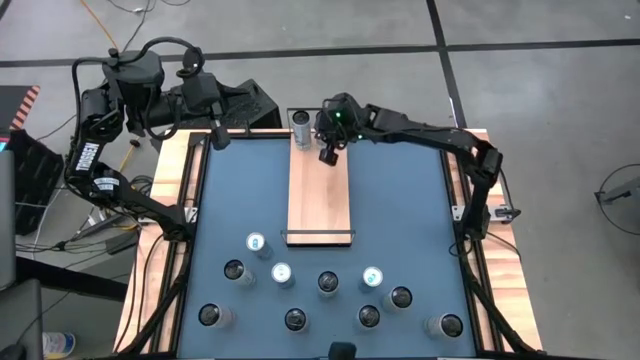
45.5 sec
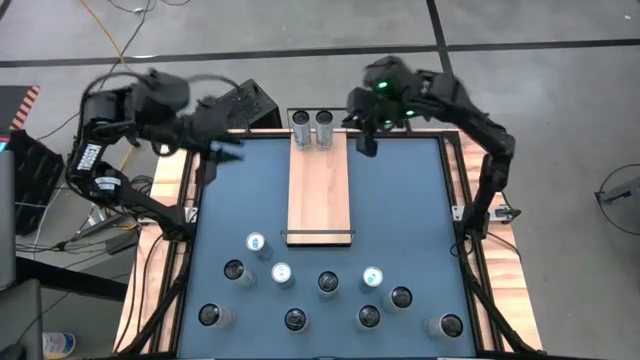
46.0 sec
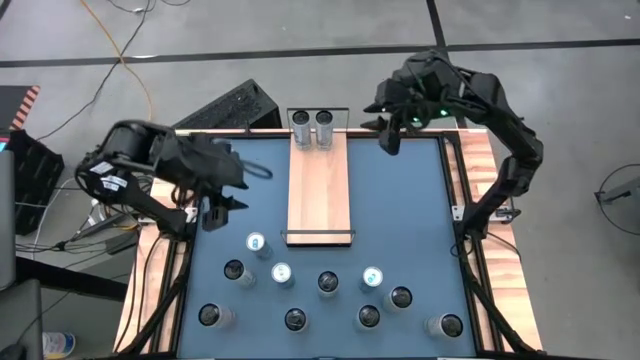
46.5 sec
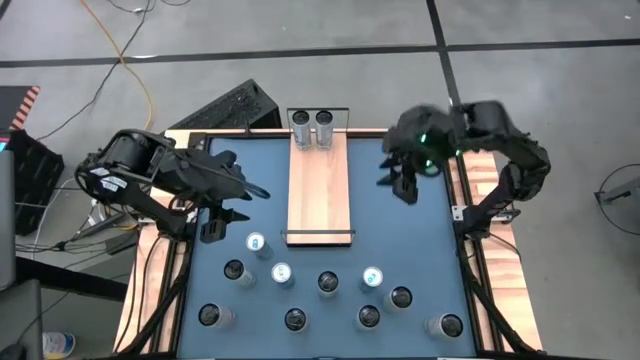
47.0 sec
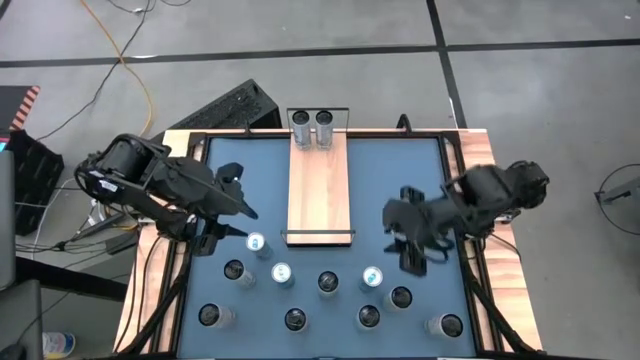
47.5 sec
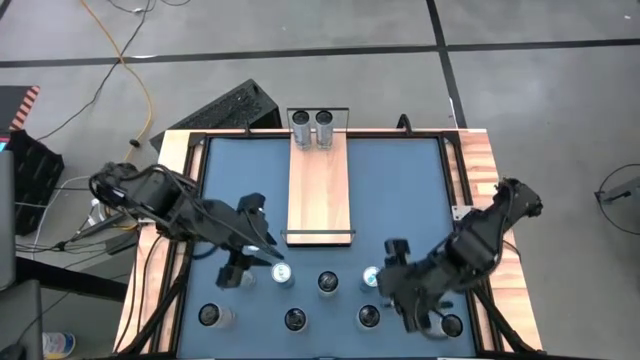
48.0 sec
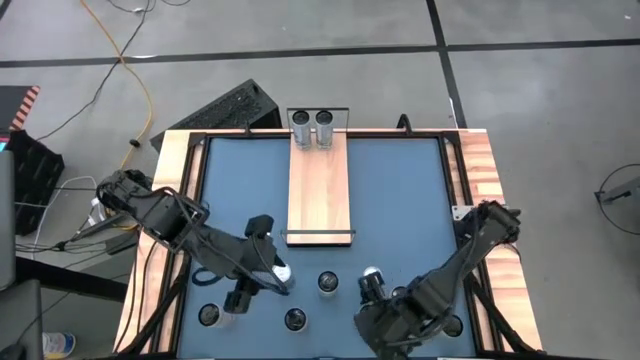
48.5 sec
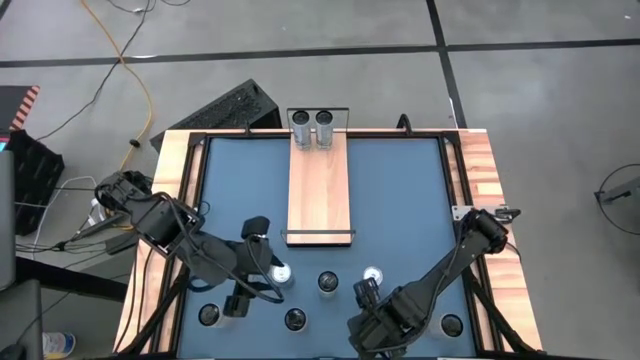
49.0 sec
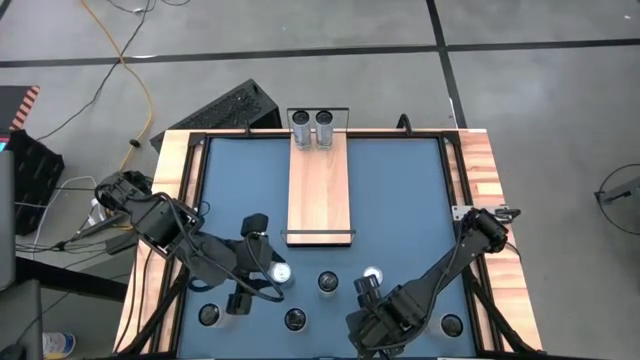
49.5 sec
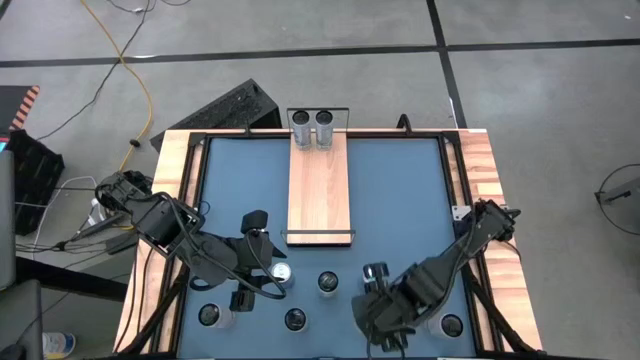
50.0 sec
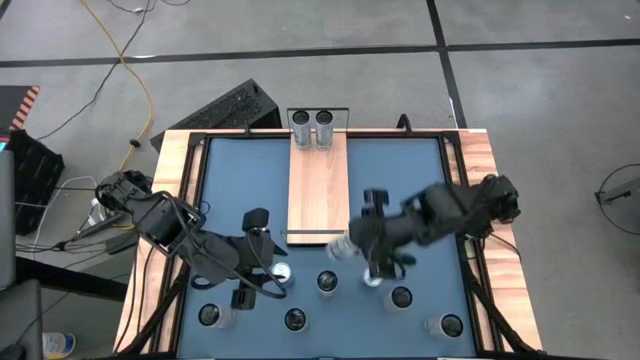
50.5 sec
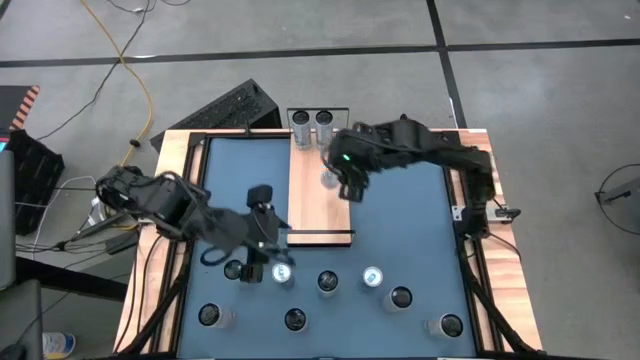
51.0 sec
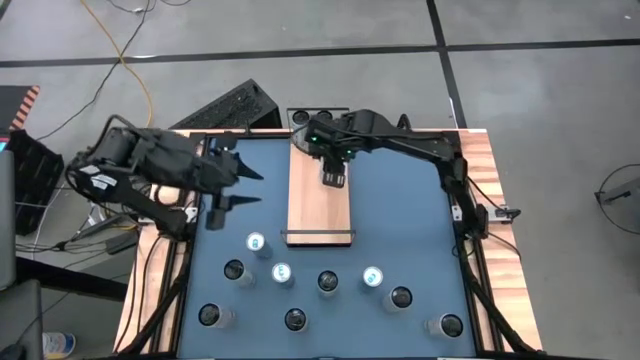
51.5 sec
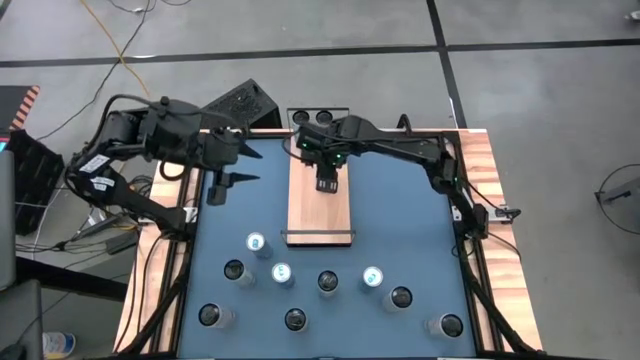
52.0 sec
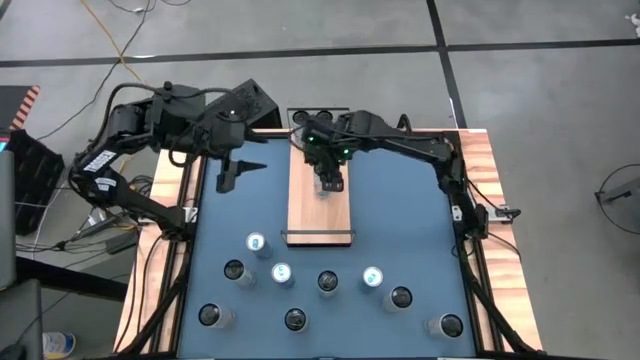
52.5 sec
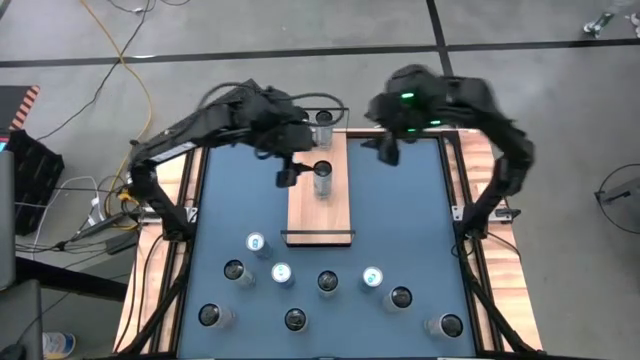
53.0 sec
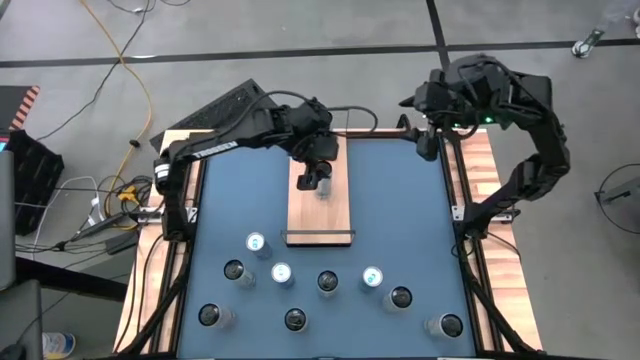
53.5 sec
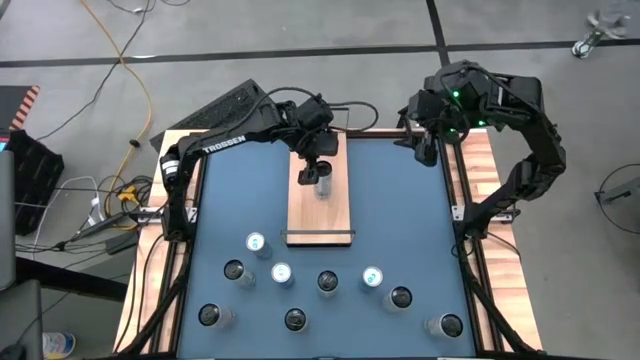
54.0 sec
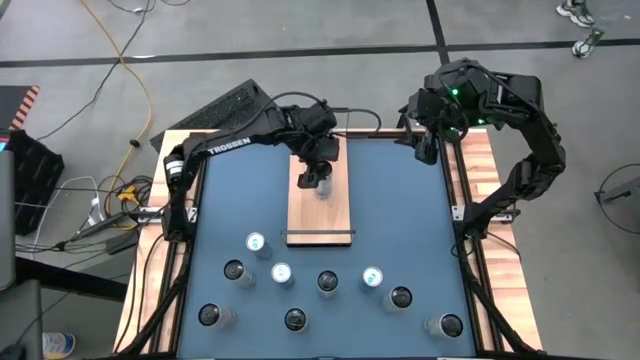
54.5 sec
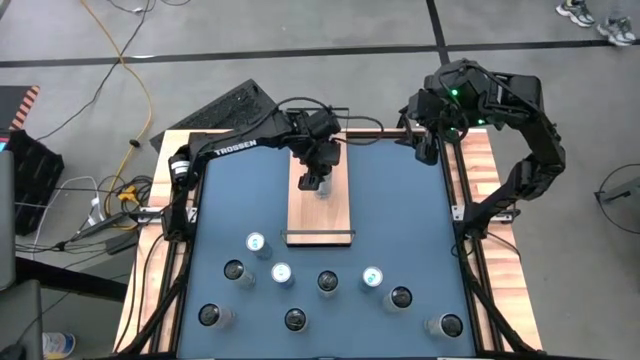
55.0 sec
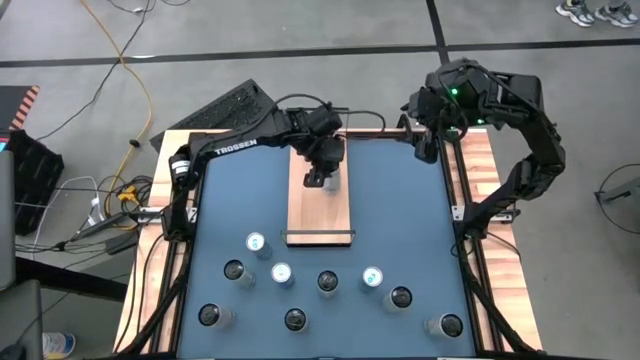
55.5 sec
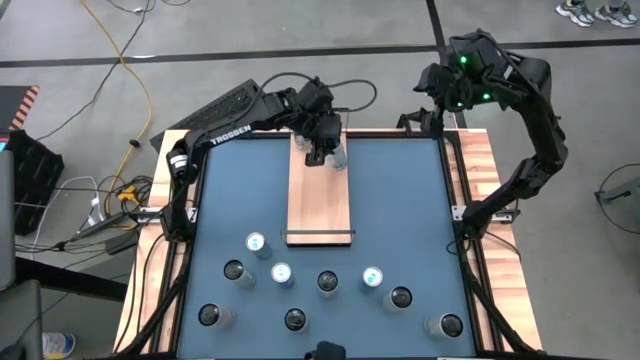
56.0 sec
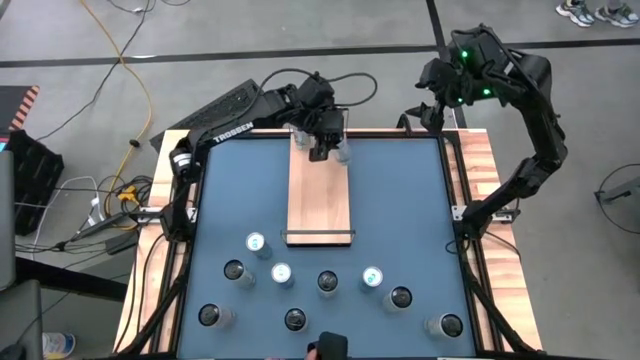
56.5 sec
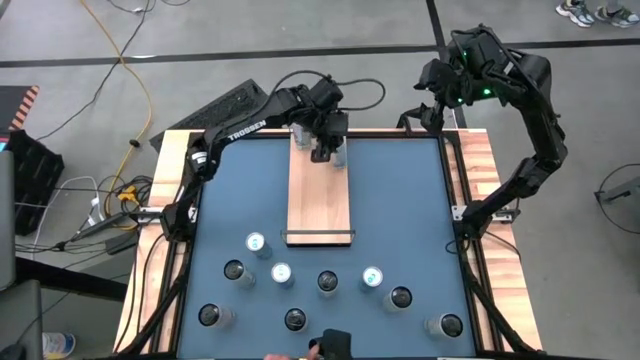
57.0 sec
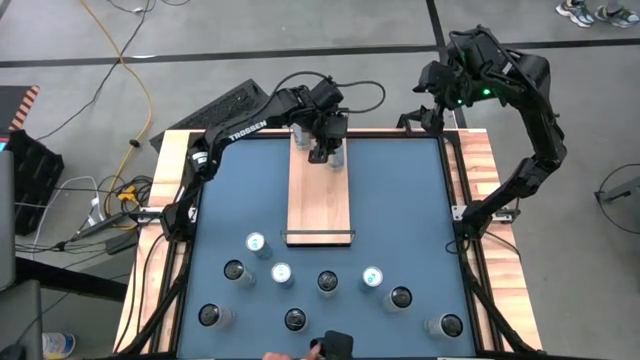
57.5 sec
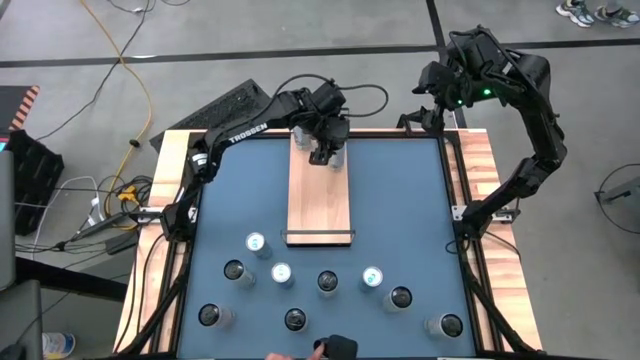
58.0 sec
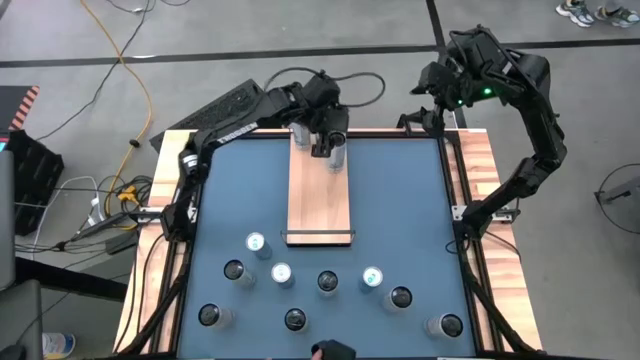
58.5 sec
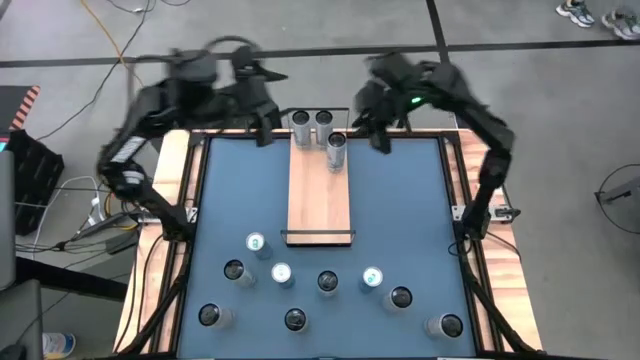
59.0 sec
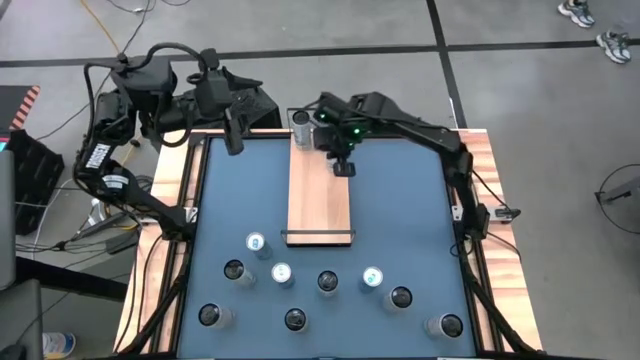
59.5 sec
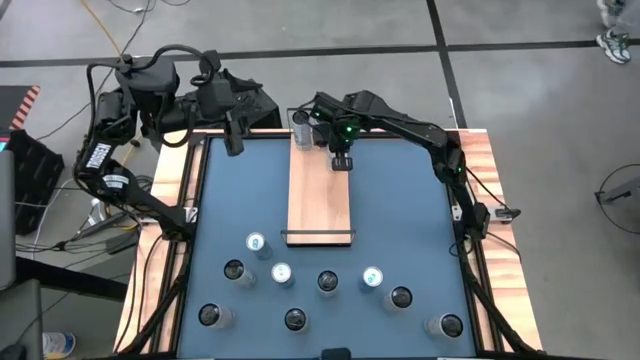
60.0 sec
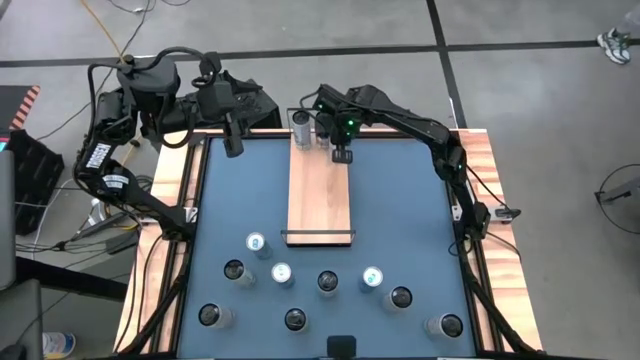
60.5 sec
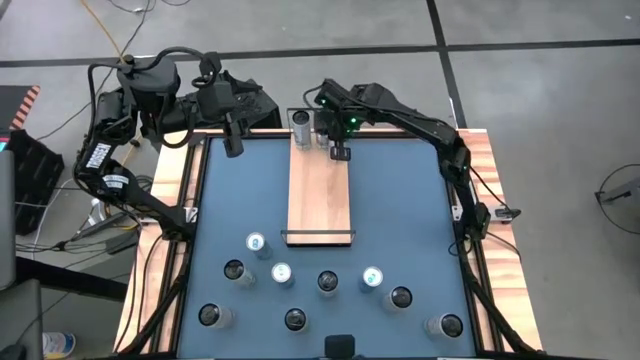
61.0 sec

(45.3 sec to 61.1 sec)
Task: Place canned beverage on shelf
Put the white and blue soda can on the shelf

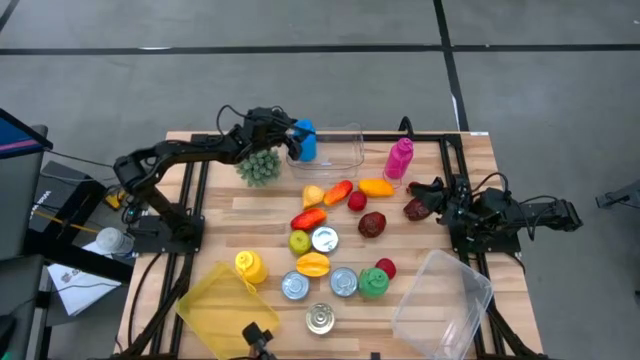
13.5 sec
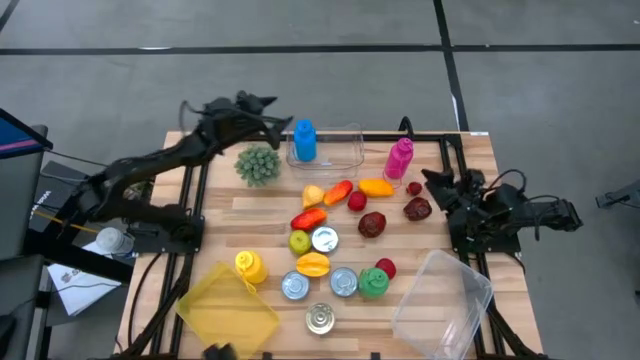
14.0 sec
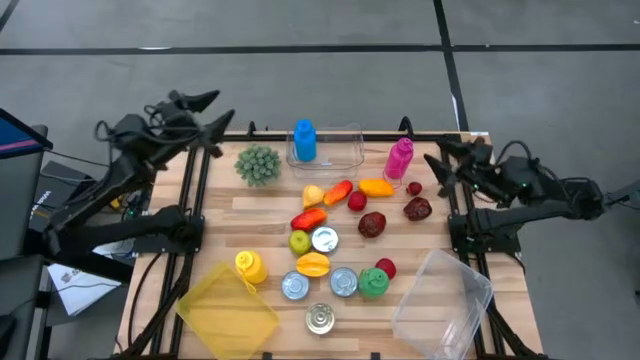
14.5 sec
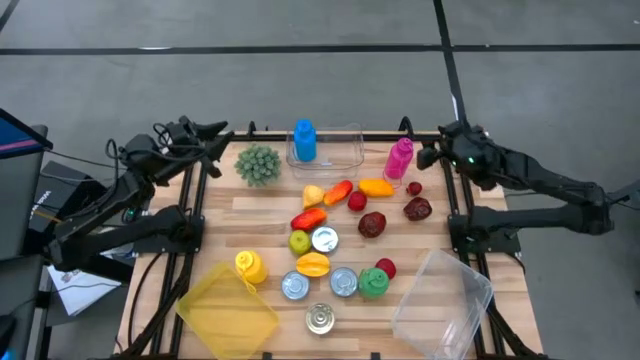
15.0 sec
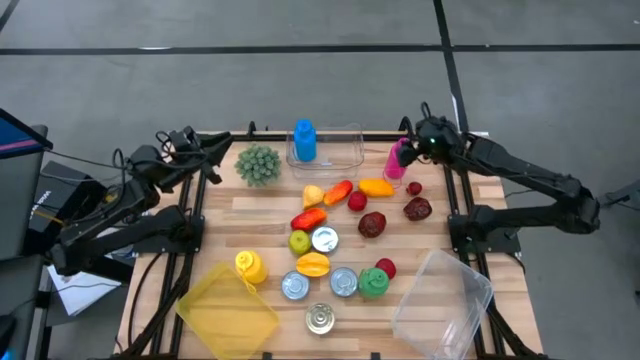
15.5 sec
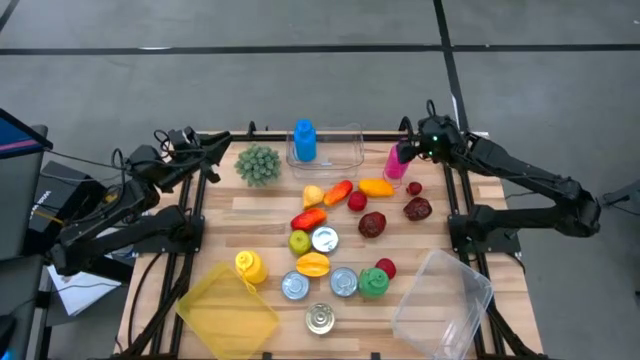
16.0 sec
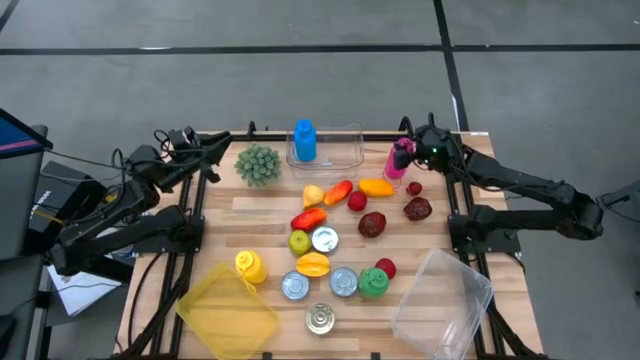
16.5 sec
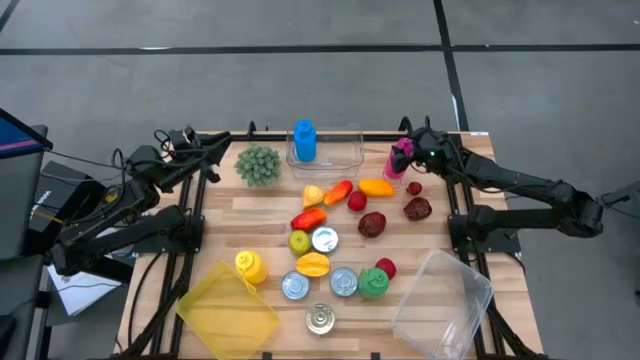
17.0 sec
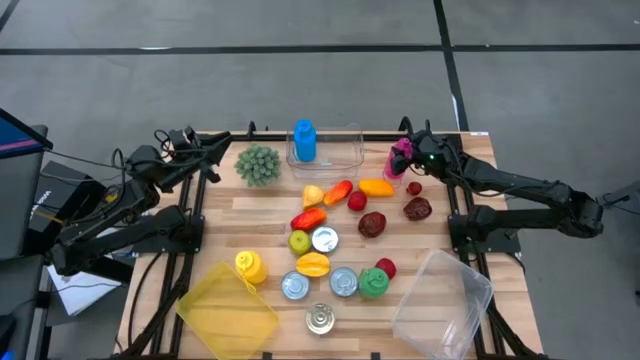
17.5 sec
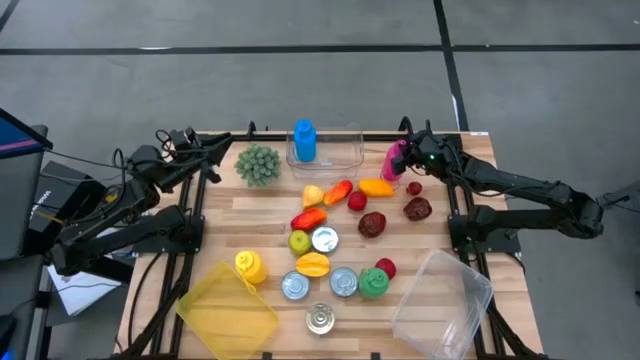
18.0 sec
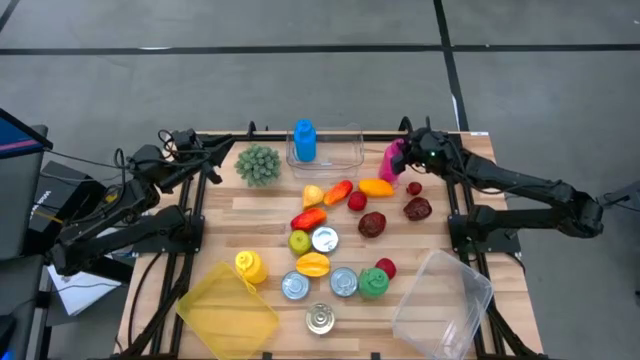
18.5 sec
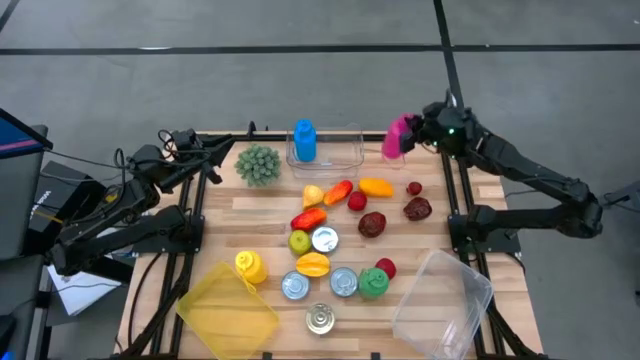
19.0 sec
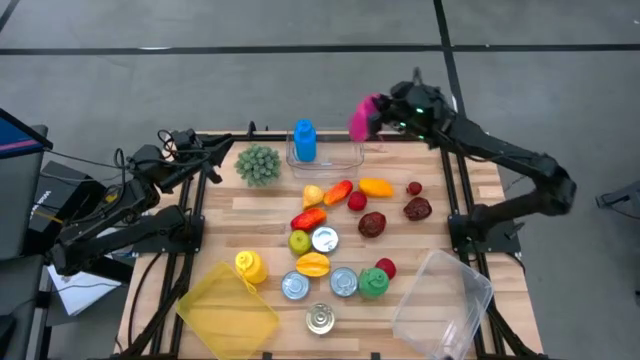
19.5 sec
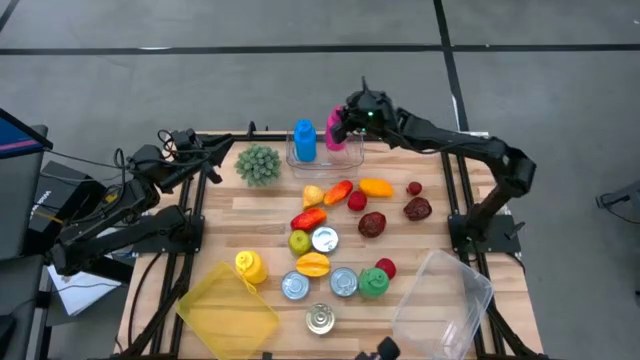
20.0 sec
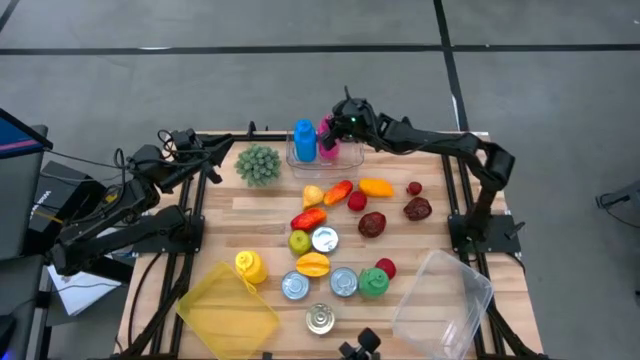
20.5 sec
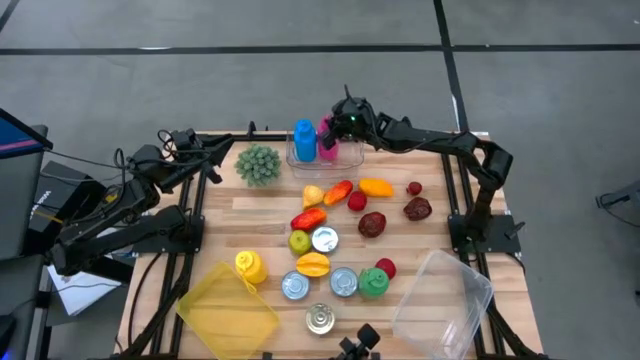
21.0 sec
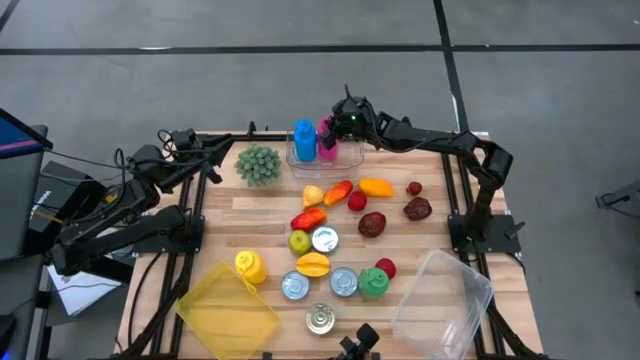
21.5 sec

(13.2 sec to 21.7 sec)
Task: Pick & Place Food Item
Put the pink water bottle into the transparent bin
